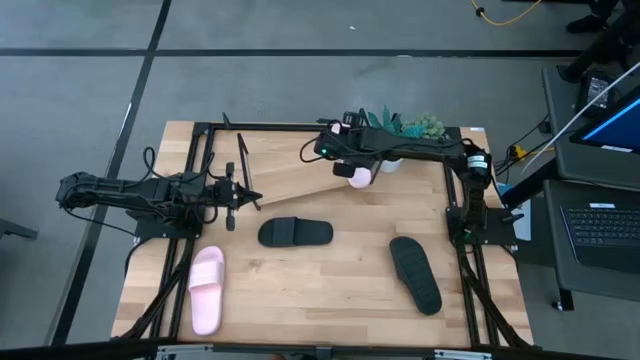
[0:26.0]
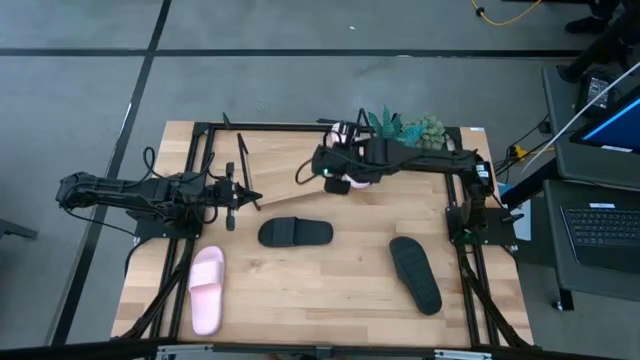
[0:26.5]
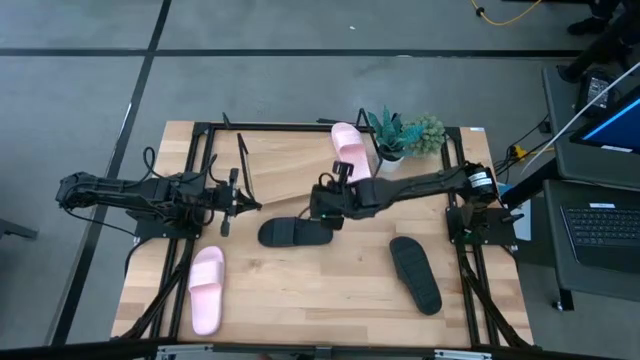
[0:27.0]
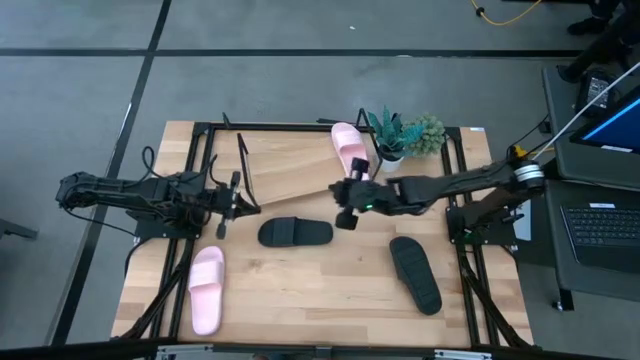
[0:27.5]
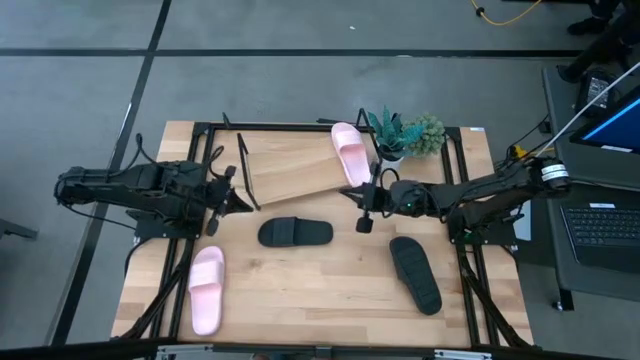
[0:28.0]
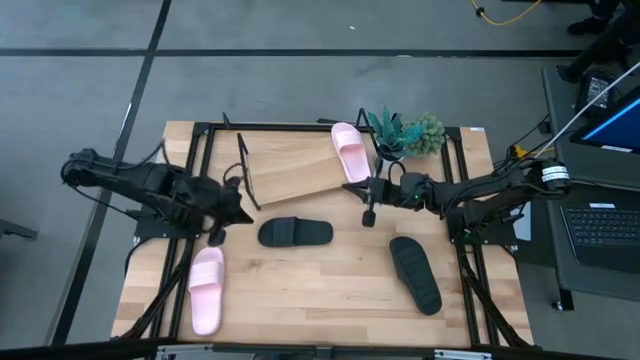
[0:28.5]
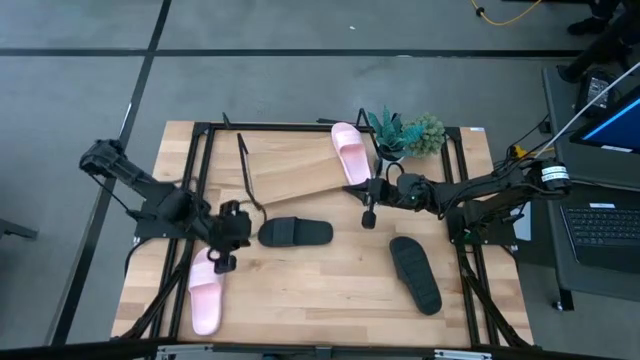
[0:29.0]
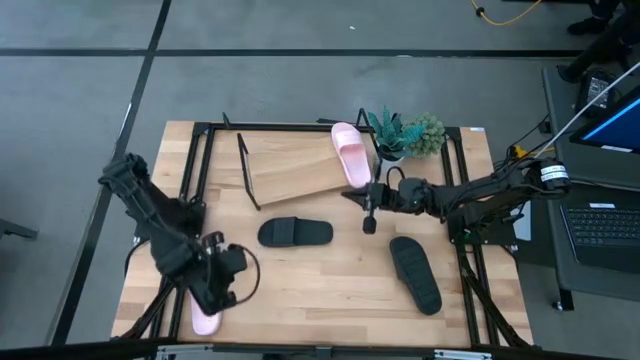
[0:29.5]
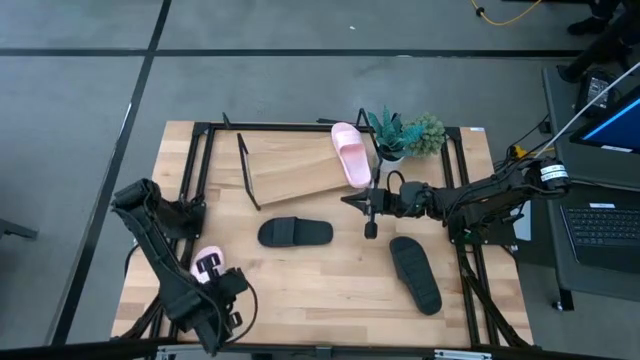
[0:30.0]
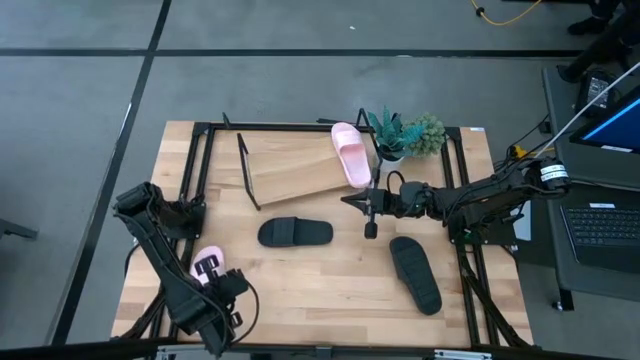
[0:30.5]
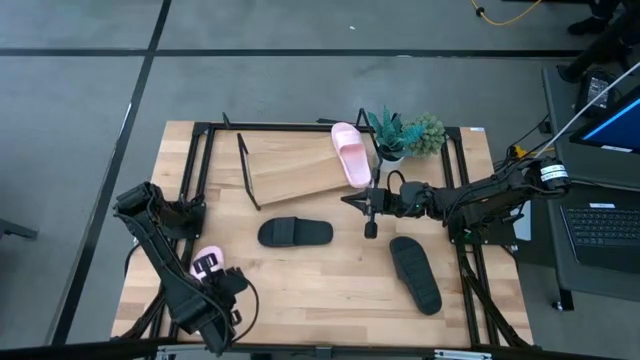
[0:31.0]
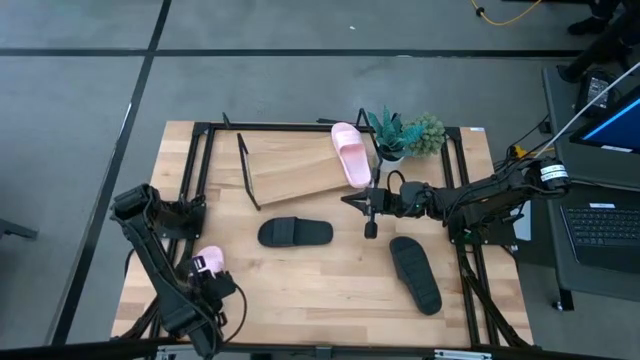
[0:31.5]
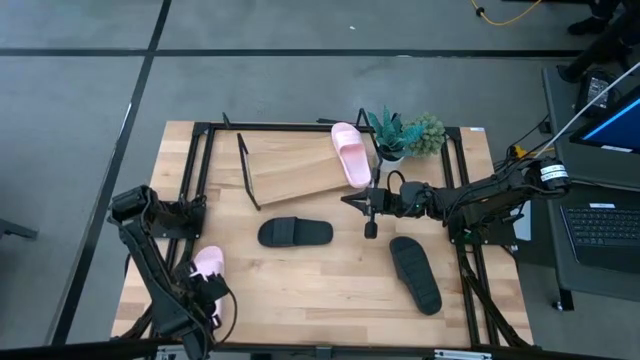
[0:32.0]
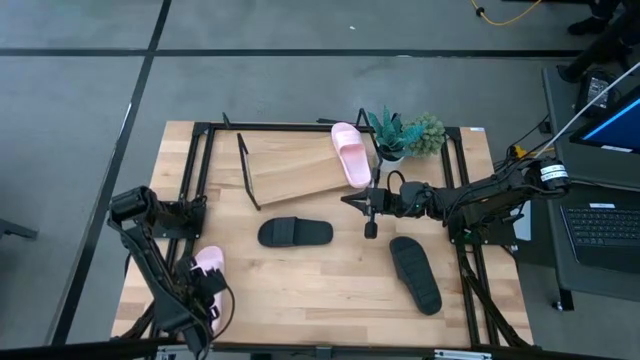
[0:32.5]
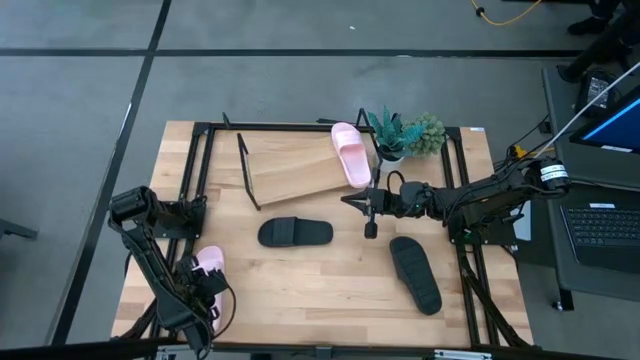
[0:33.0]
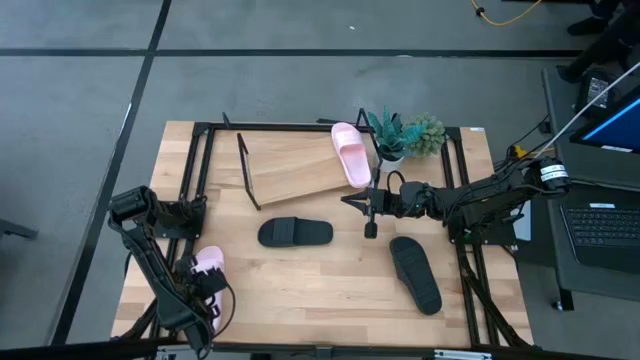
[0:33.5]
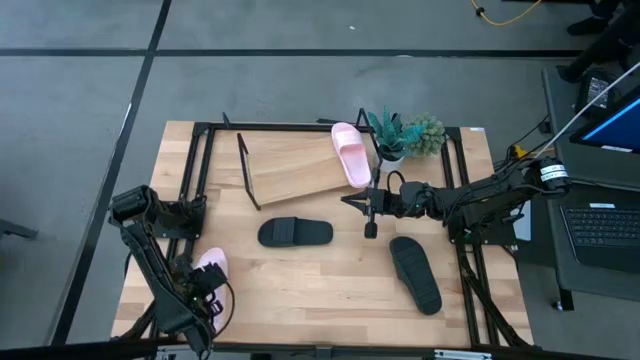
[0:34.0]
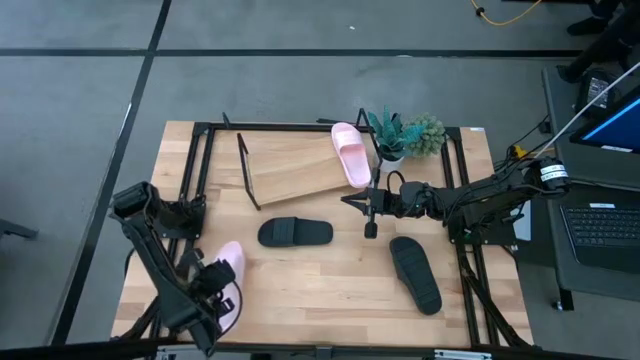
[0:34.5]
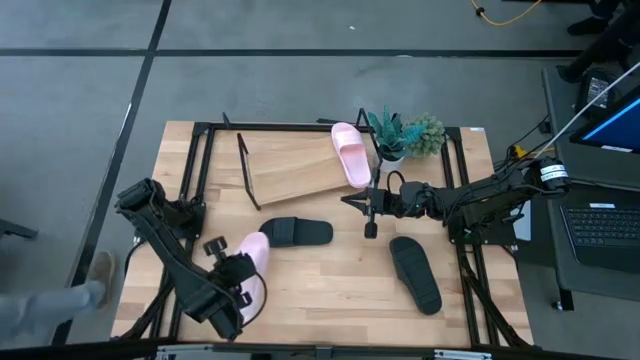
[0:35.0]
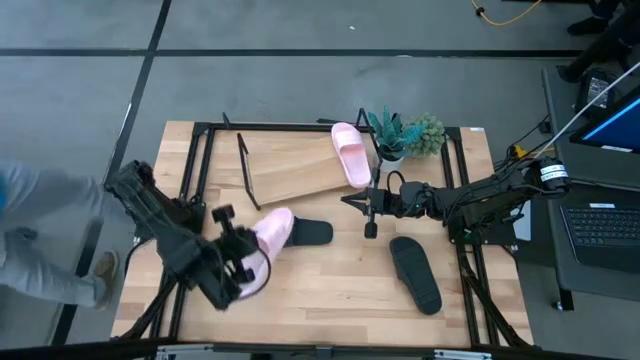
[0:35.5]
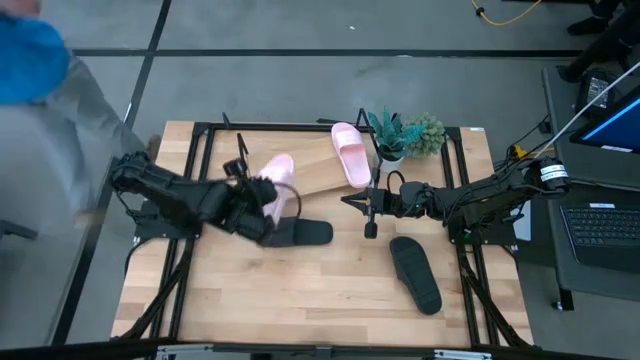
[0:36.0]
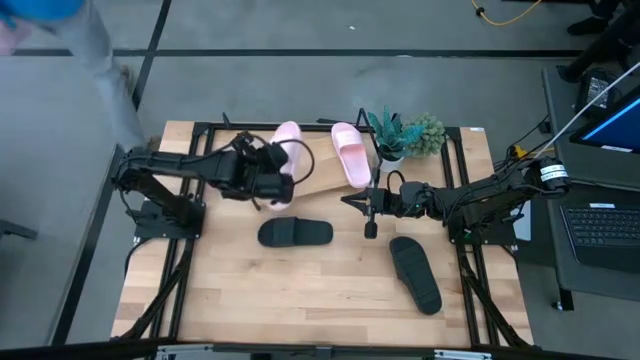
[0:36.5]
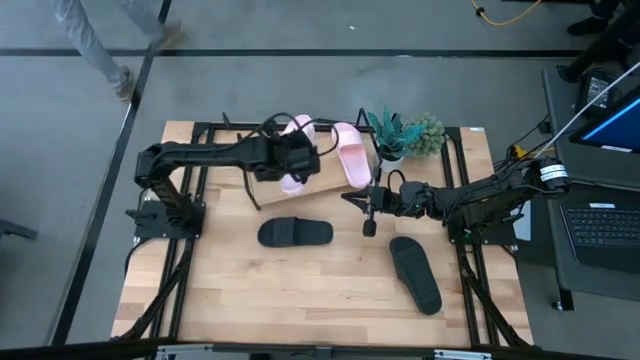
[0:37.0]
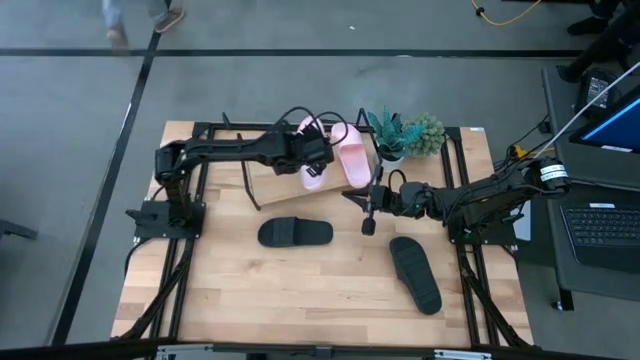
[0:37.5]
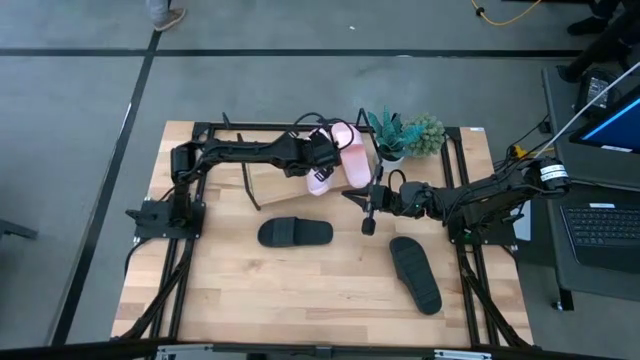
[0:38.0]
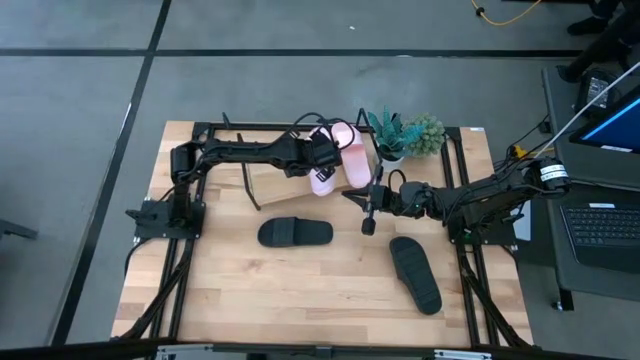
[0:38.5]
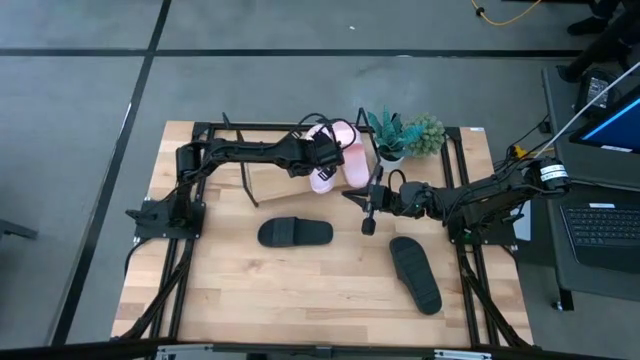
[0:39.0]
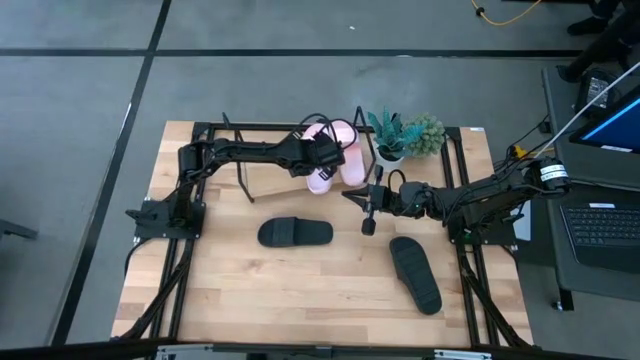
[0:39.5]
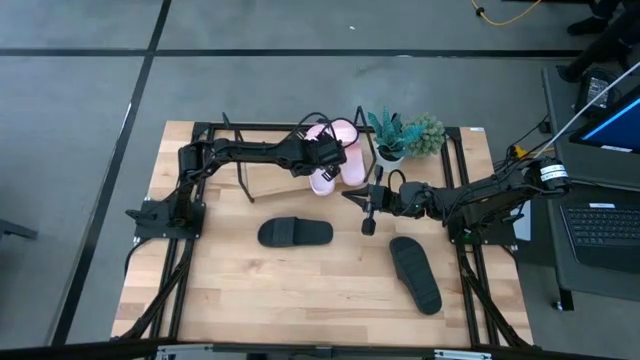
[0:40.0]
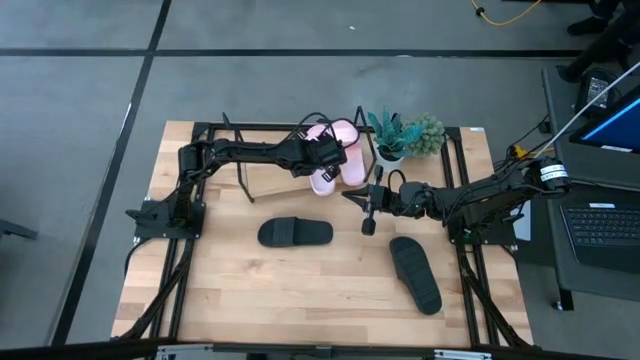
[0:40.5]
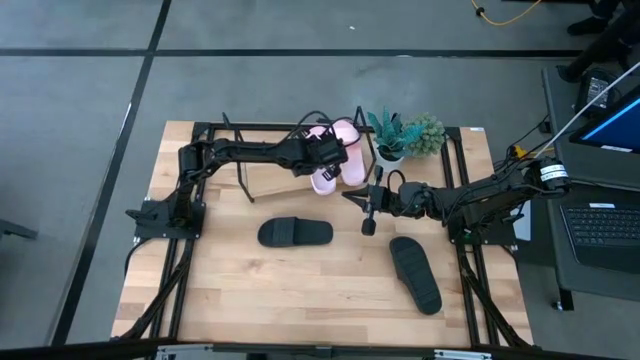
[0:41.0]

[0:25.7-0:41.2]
Task: Pick and place slides into the shelf
Put the pink slide on the shelf

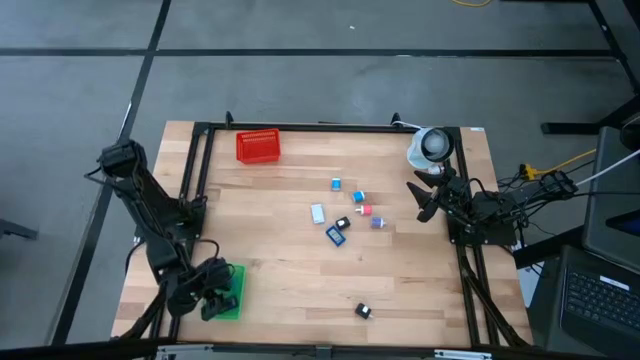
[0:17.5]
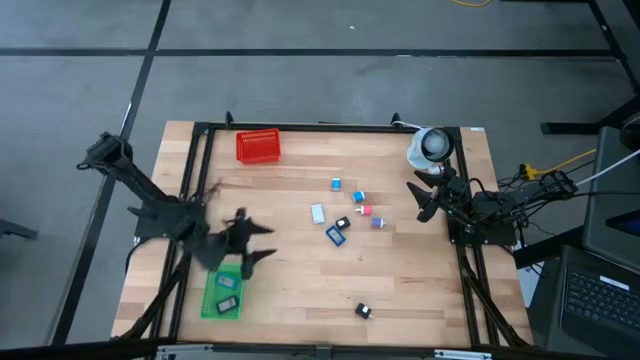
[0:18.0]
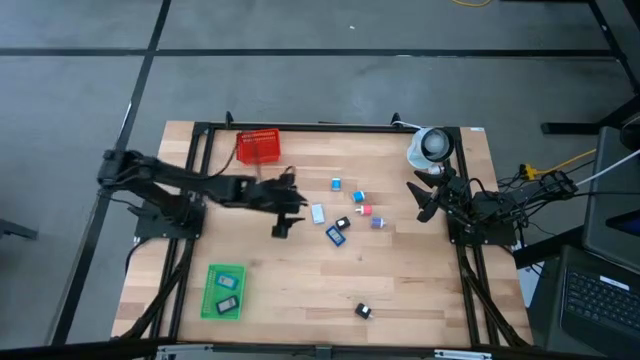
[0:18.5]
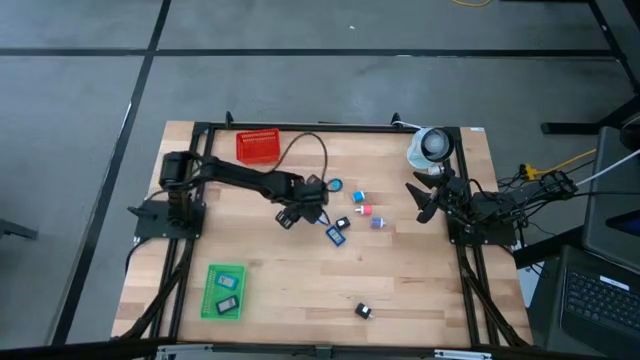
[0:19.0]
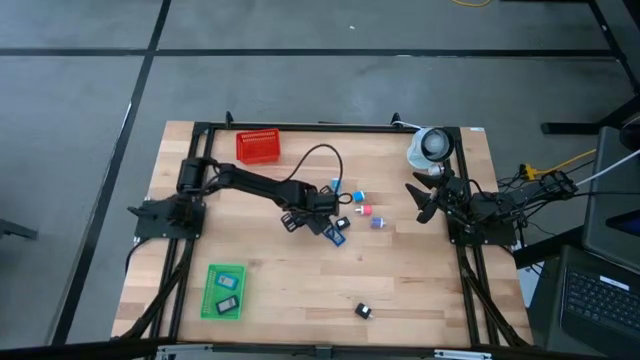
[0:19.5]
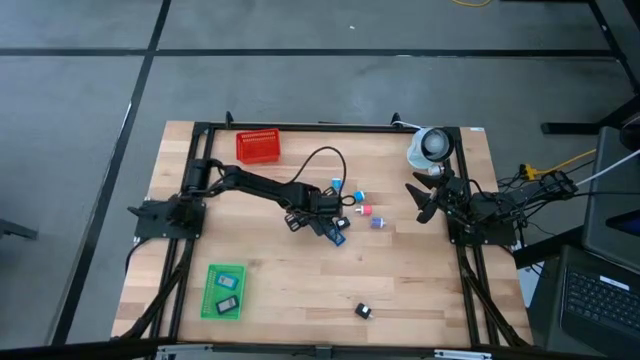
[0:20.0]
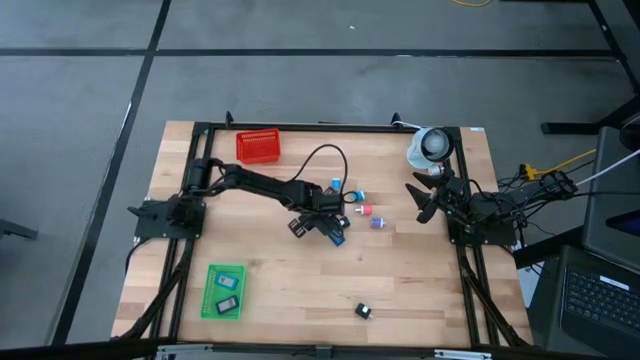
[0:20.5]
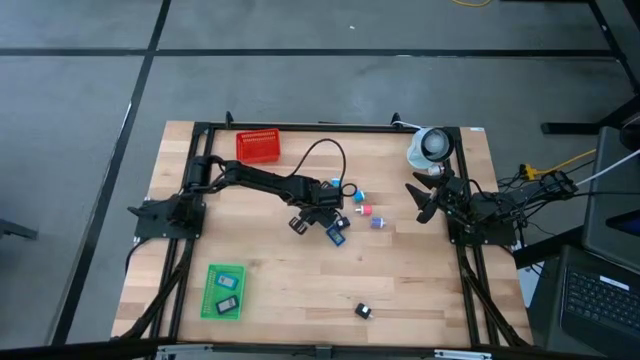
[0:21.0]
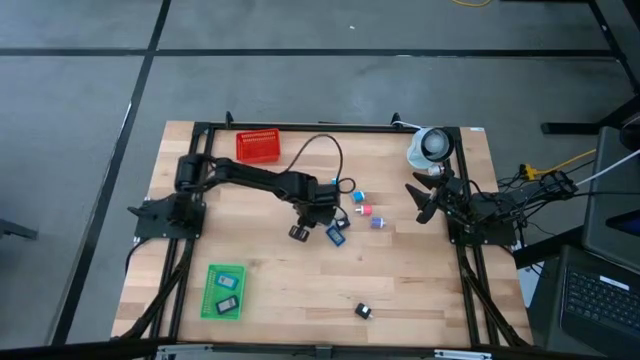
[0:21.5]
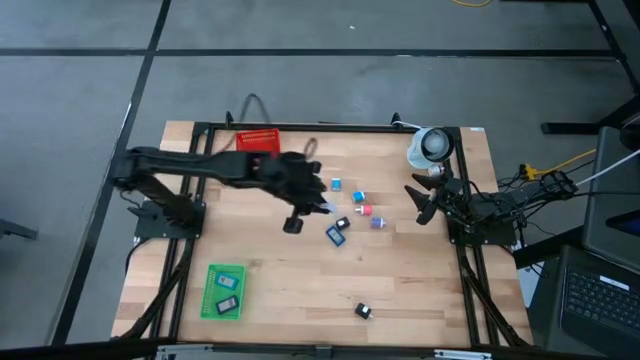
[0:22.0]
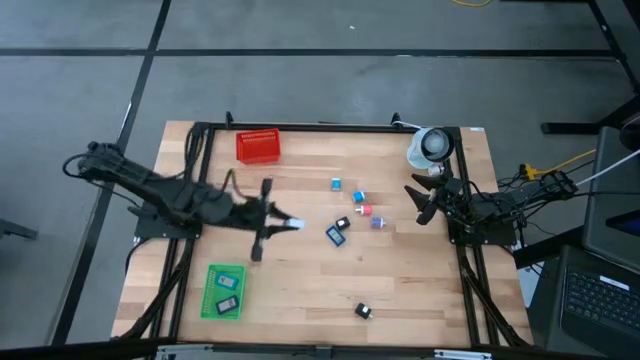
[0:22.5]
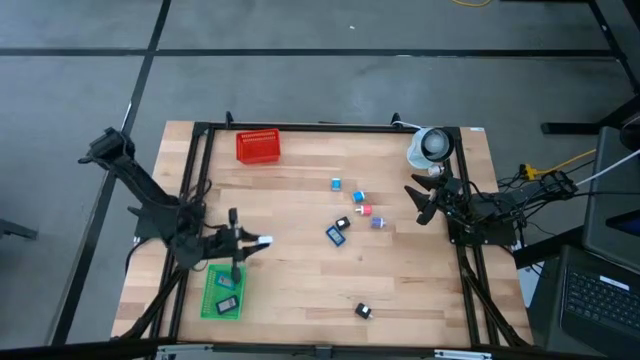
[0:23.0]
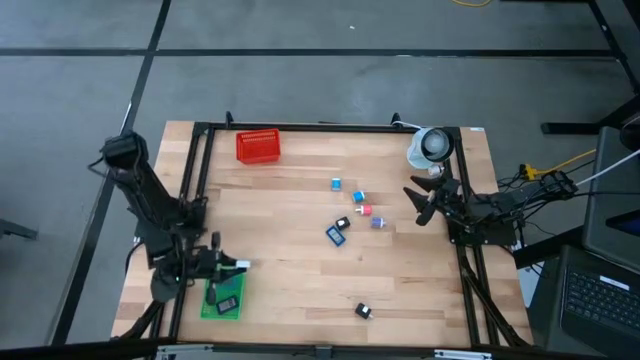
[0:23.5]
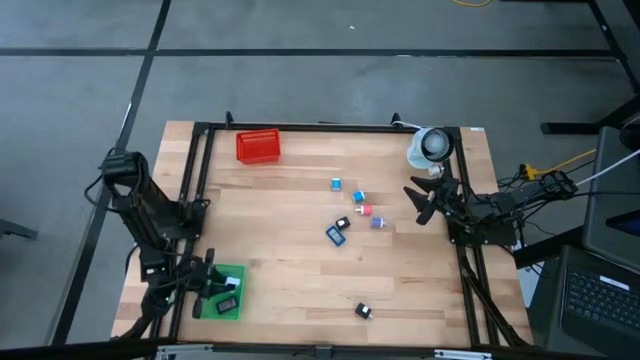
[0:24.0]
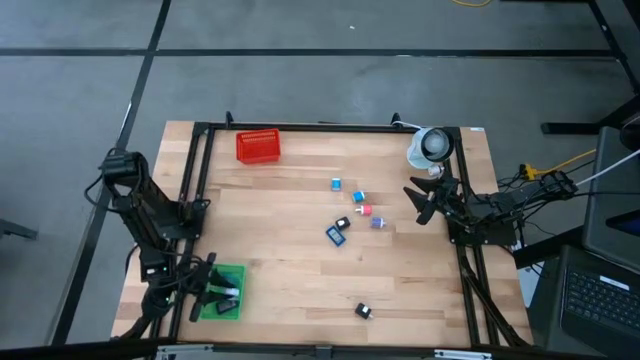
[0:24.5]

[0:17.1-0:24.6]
Task: Pick & Place Office items
Put the white digital timer into the green bin
